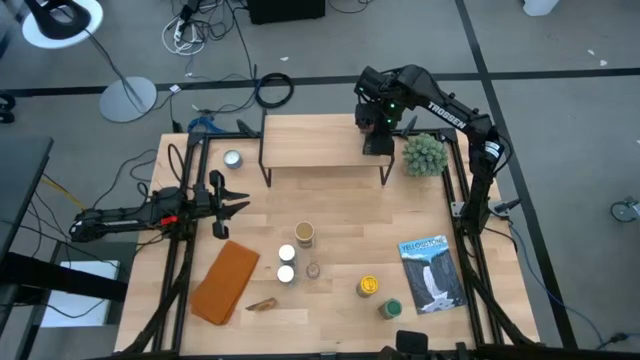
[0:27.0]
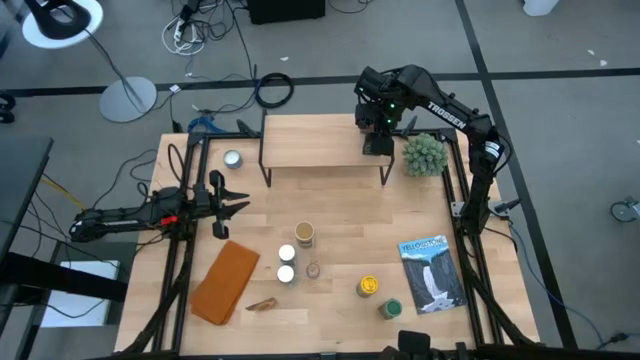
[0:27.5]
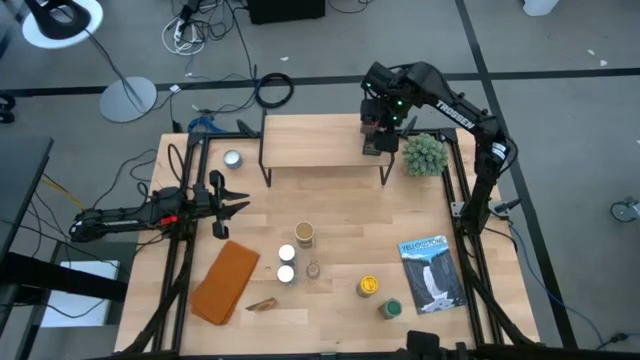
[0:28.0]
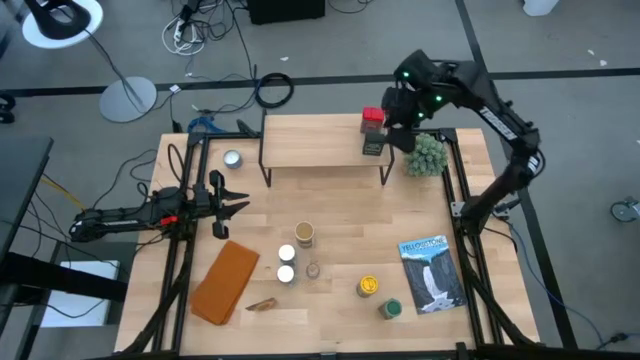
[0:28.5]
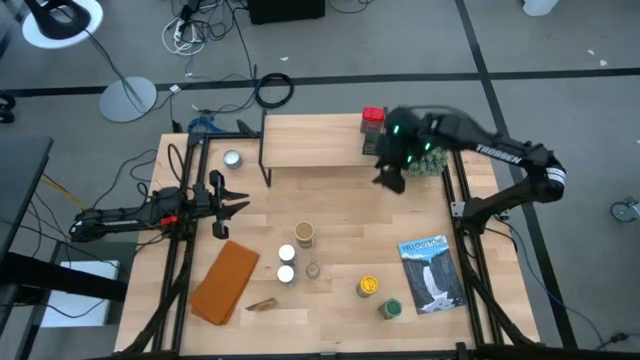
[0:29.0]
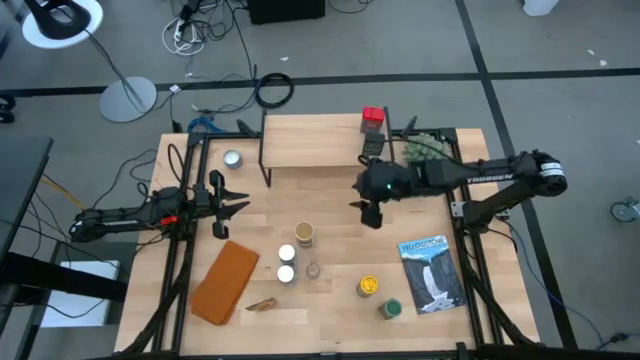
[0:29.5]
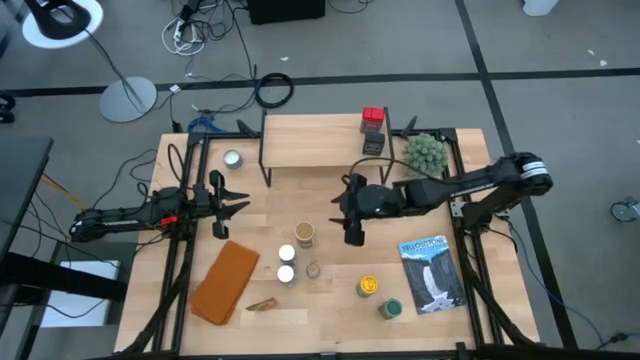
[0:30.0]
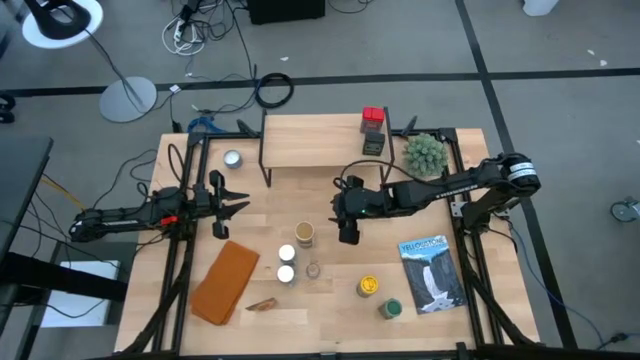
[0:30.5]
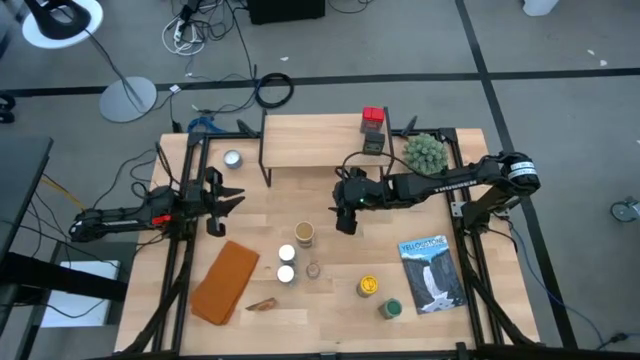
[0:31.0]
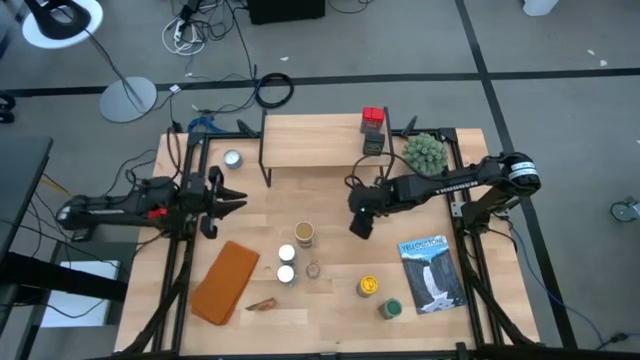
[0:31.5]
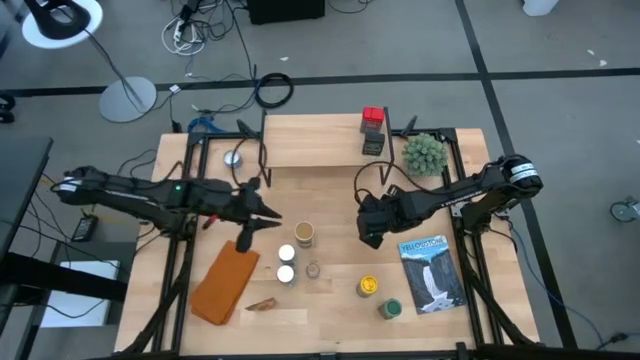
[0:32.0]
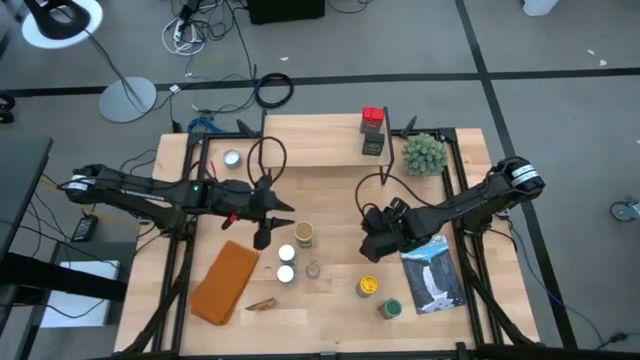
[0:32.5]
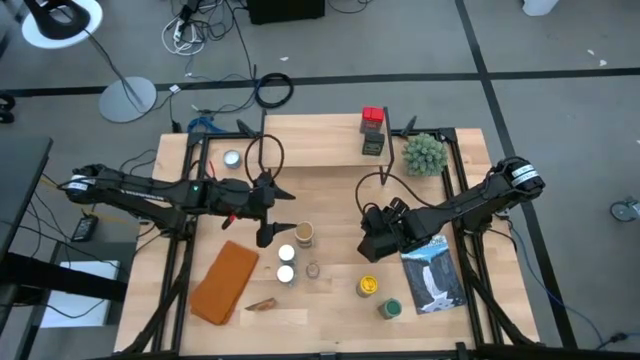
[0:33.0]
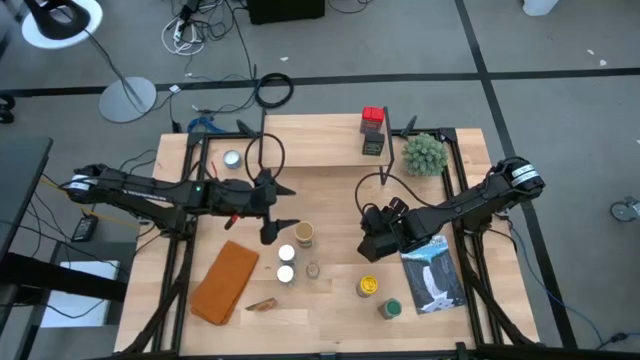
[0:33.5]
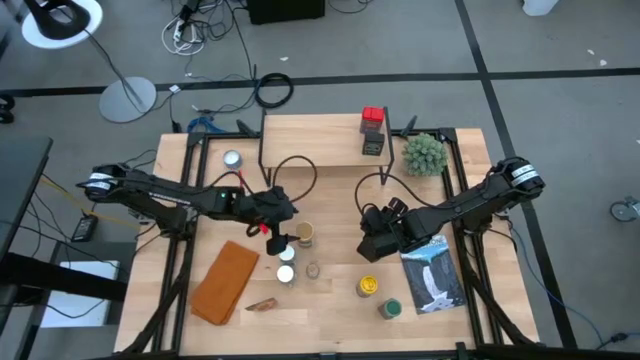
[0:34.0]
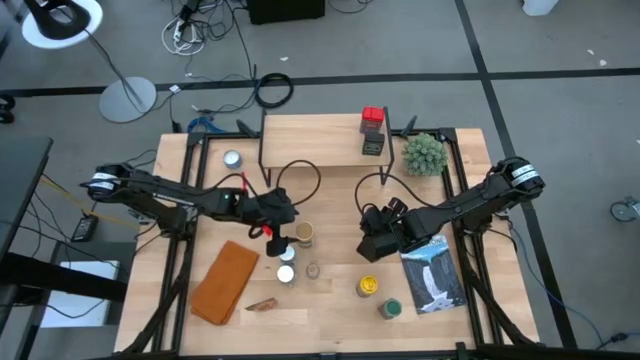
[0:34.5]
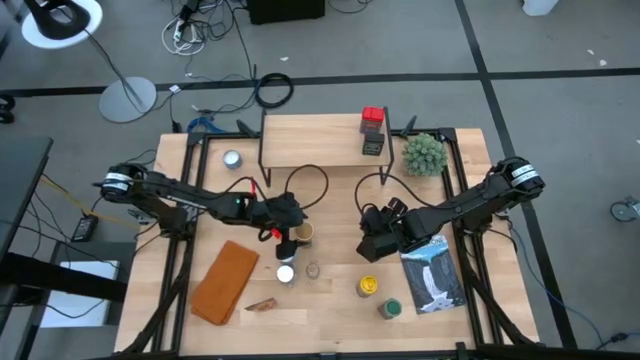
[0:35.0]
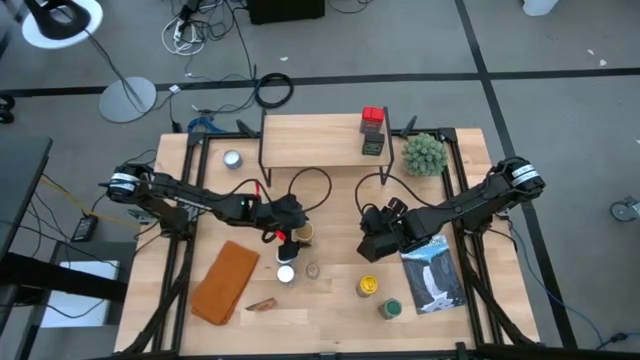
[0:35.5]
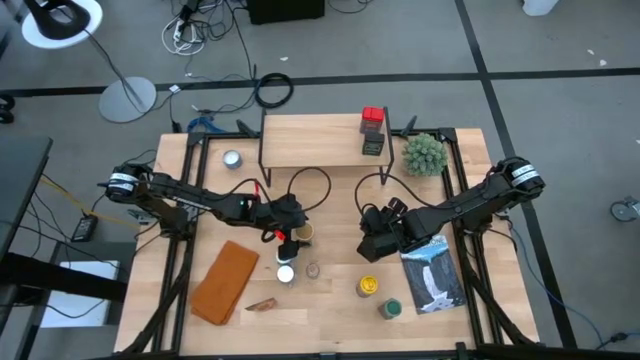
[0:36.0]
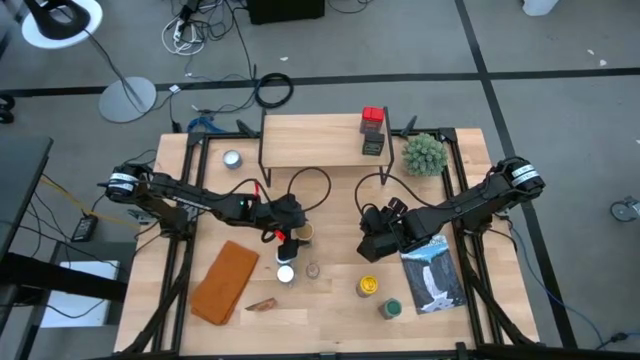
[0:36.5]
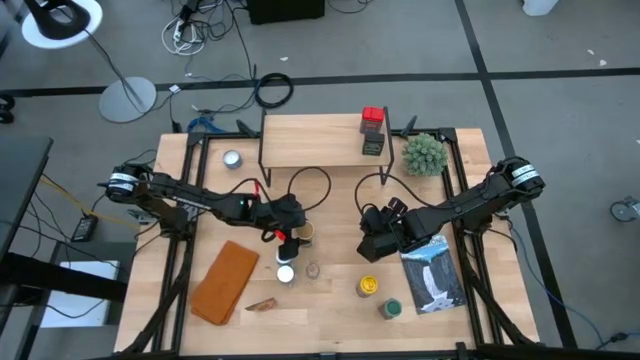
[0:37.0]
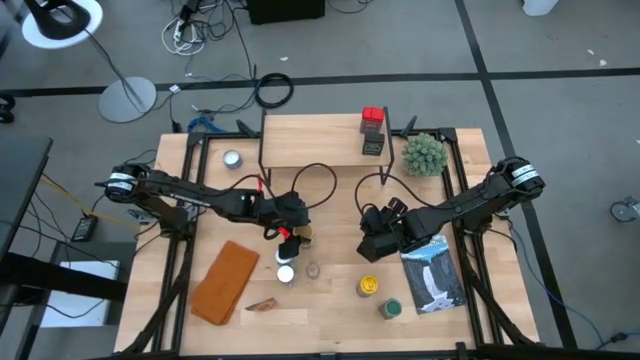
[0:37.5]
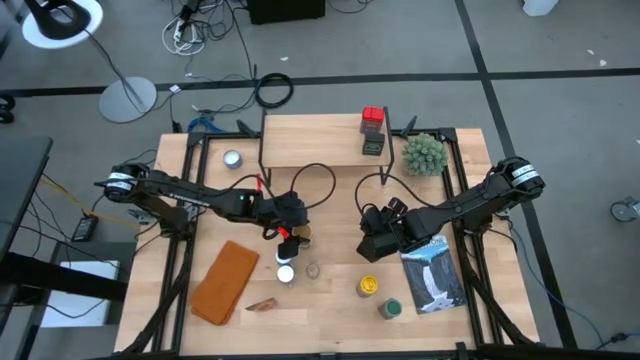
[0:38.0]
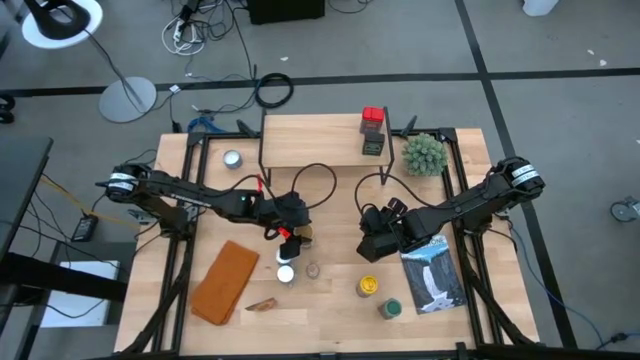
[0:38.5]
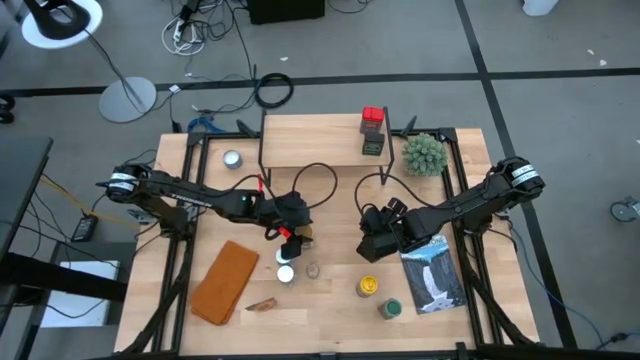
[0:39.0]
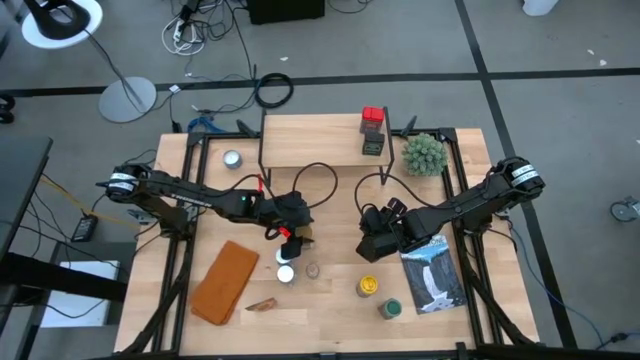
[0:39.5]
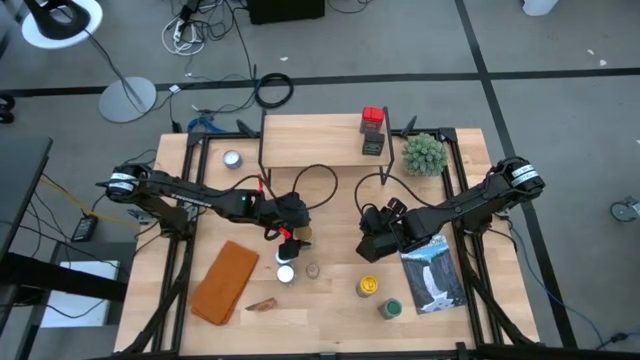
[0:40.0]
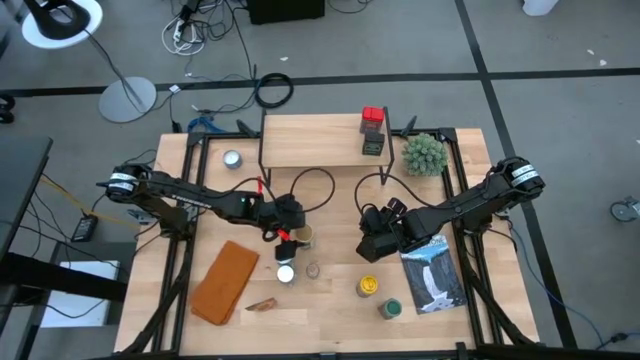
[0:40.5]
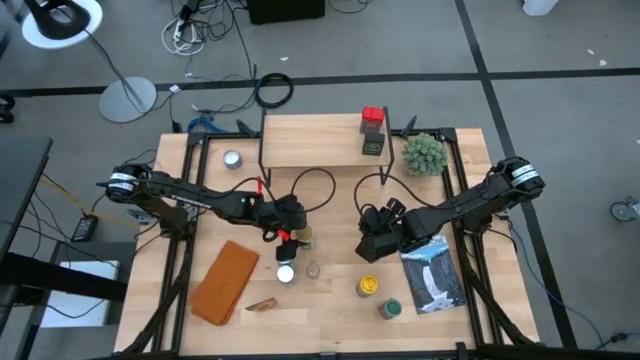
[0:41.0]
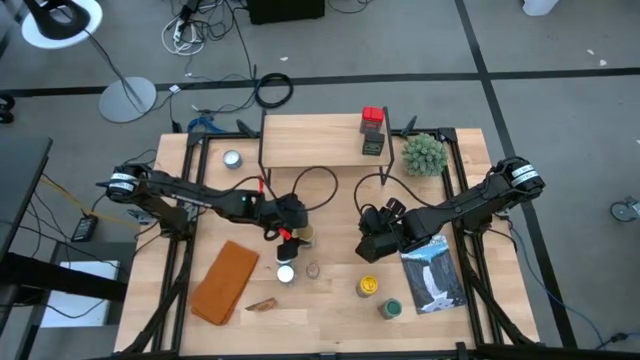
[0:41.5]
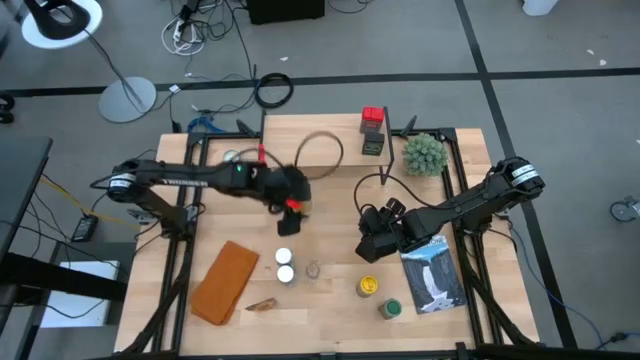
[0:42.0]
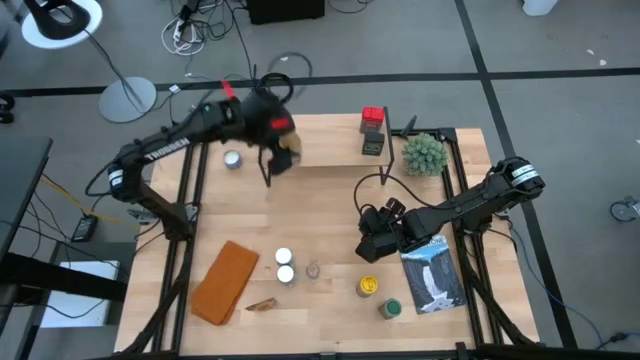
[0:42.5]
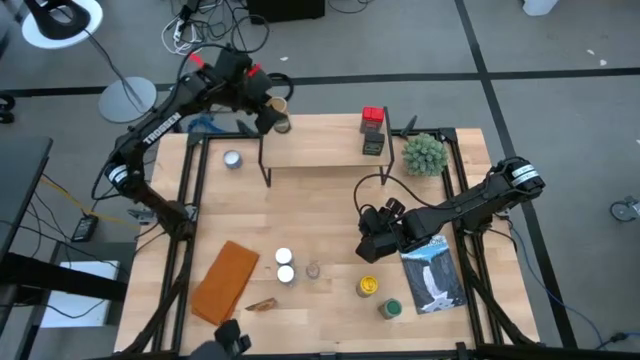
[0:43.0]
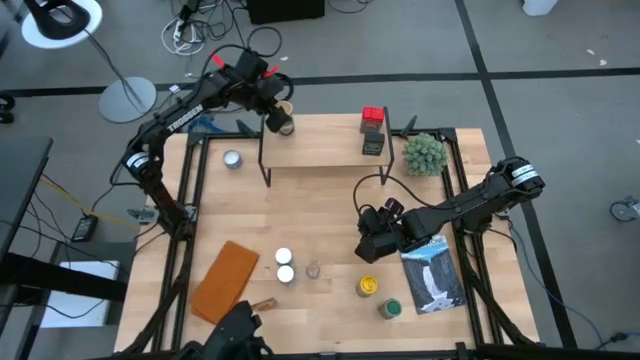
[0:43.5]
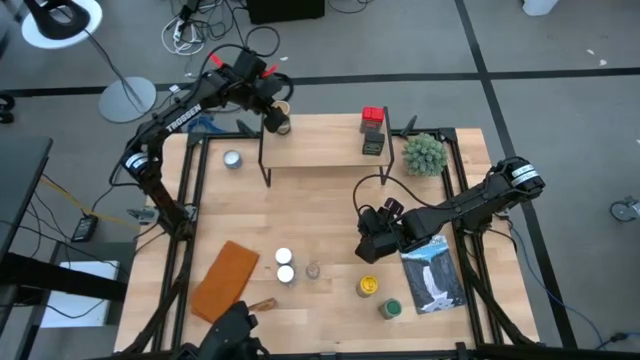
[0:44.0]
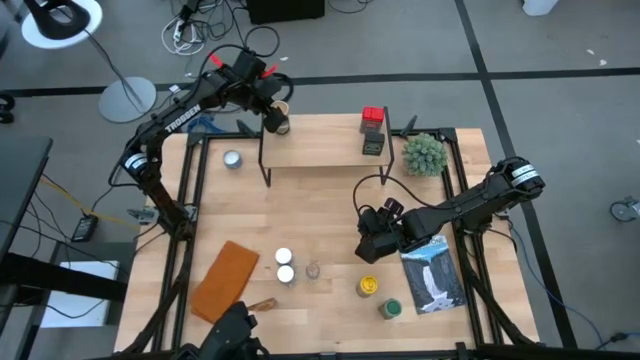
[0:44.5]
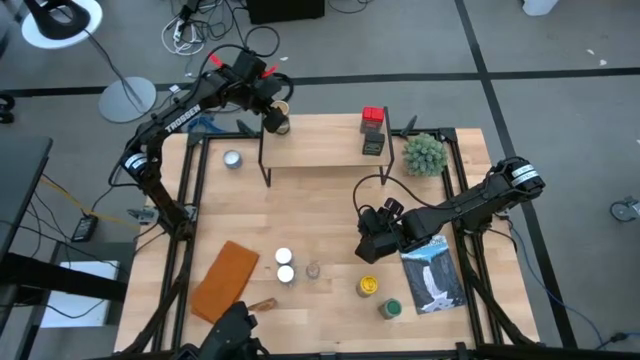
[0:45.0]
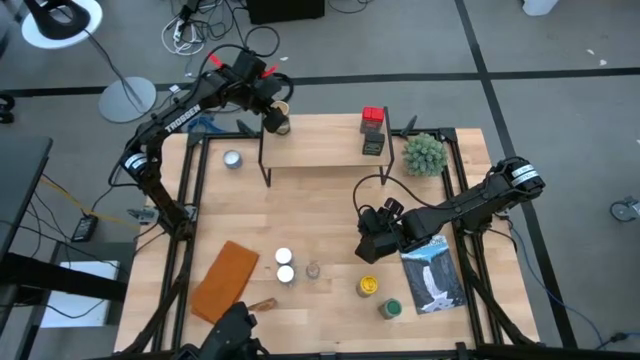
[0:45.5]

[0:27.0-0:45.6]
Task: Shelf spices
Put the gold seasoning bottle on the shelf

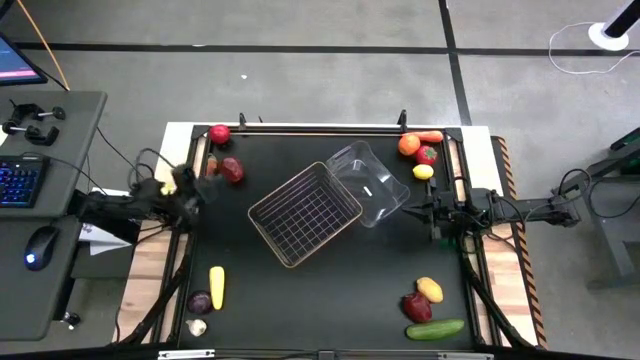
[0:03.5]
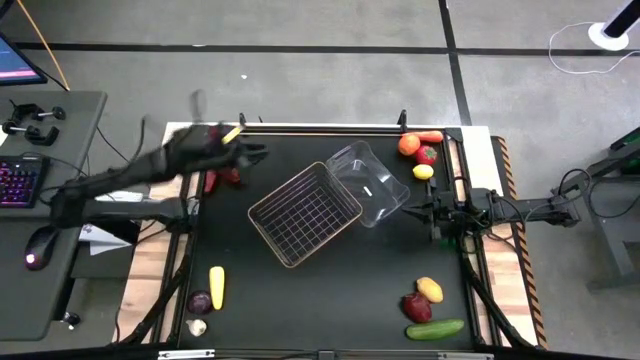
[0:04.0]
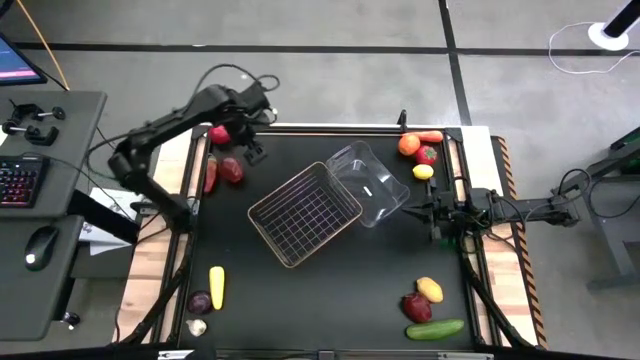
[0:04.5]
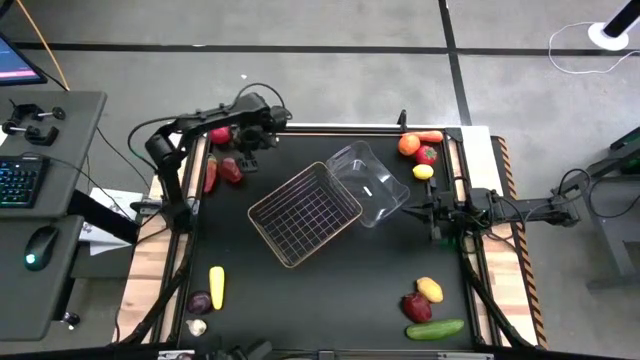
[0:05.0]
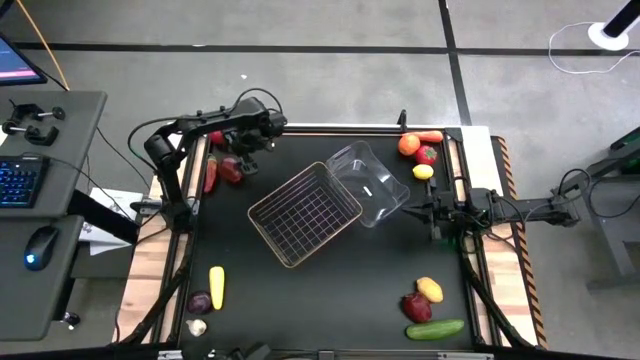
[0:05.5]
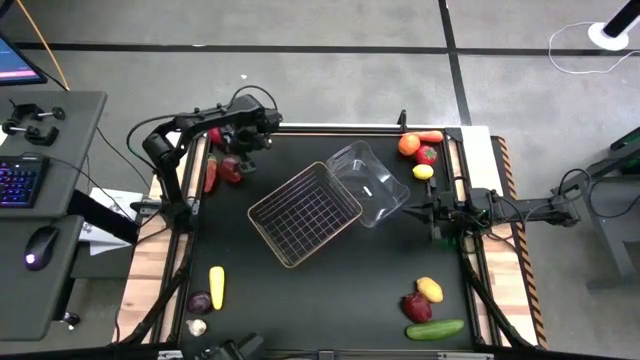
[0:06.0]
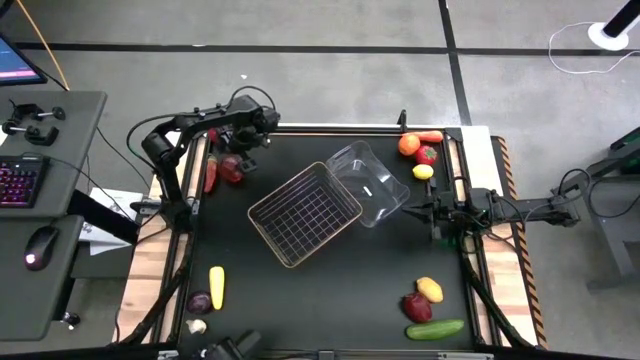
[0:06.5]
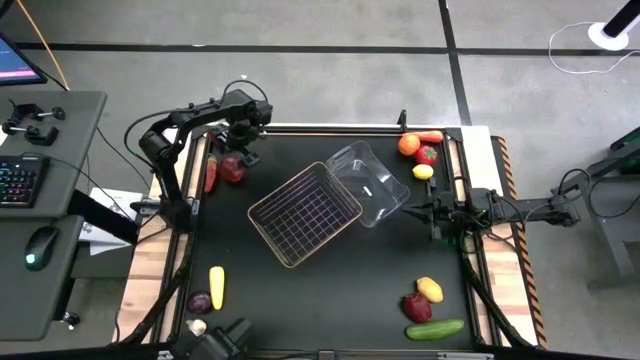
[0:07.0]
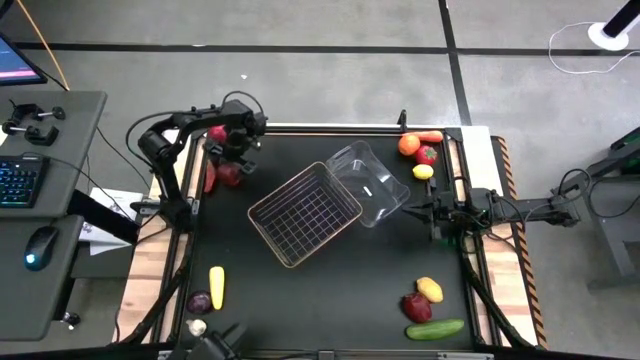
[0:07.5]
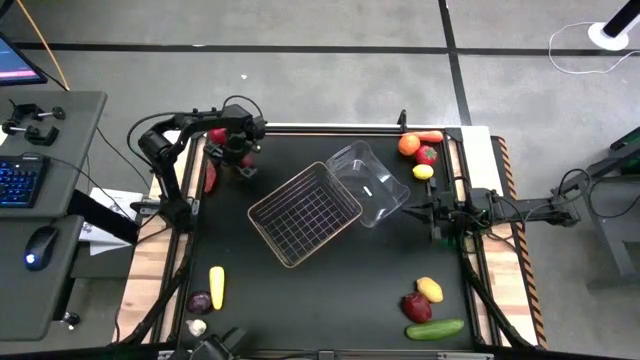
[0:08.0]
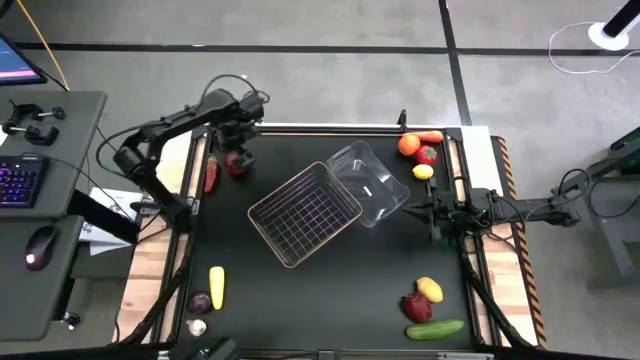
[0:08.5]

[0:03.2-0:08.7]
Task: Sort produce into baskets
Put the top apple into the gold wire basket
